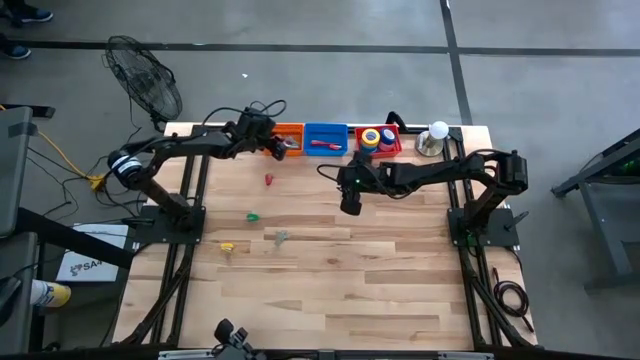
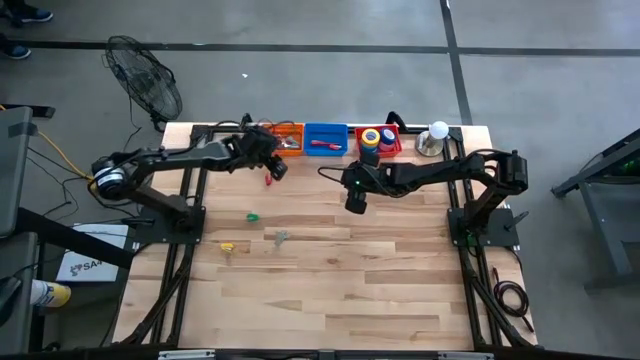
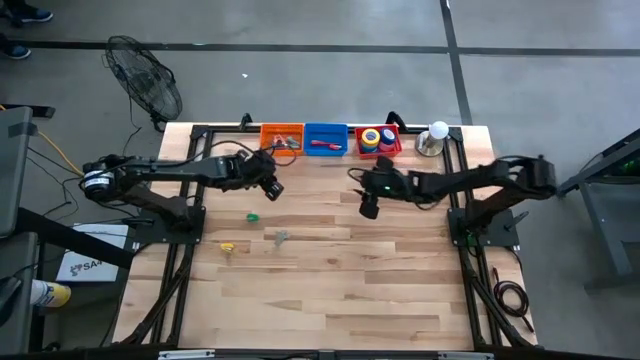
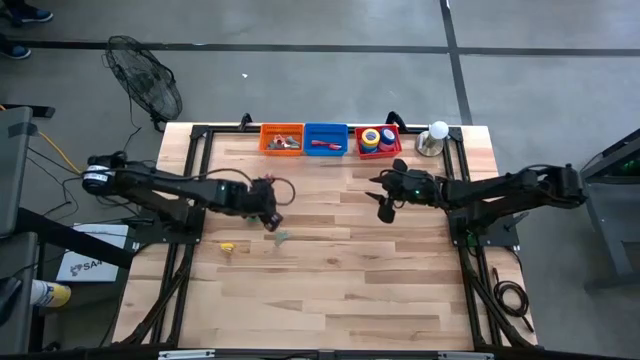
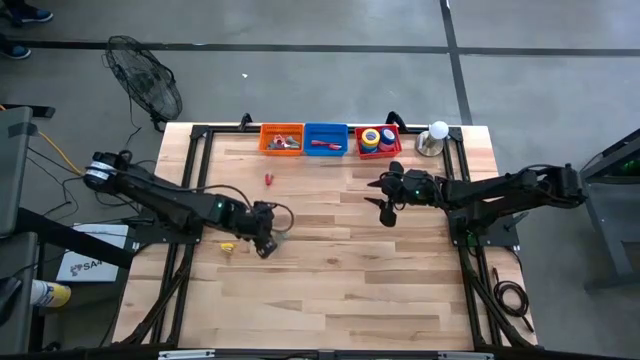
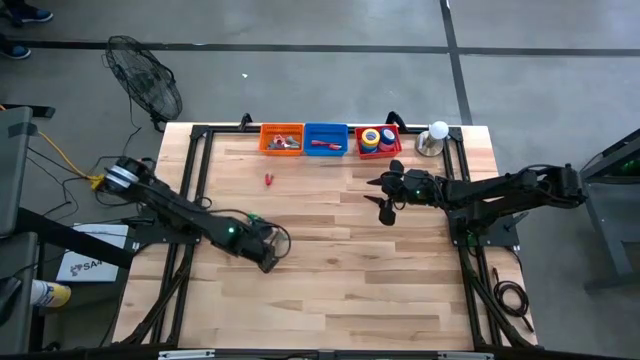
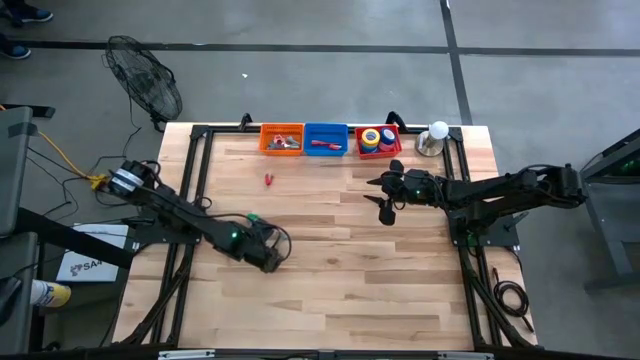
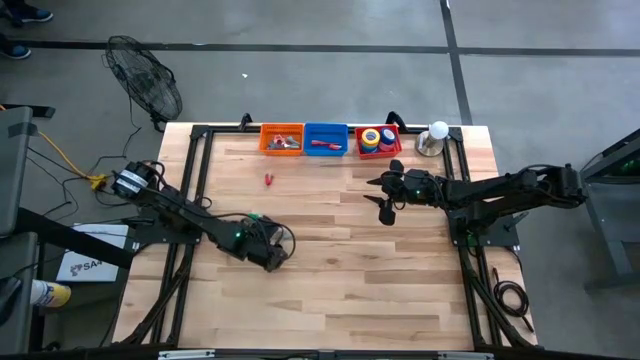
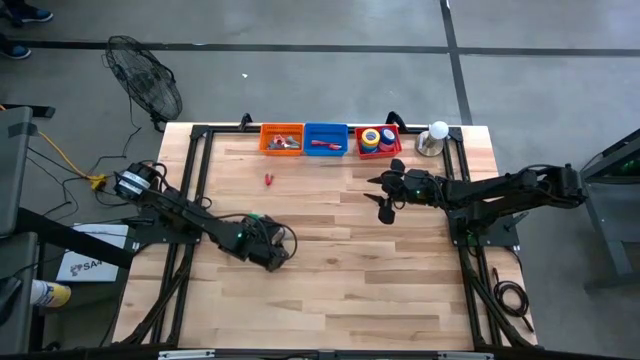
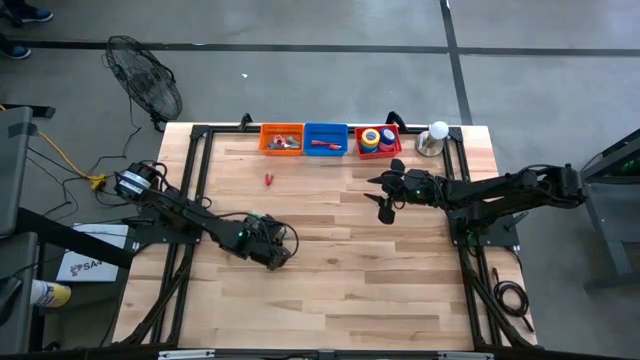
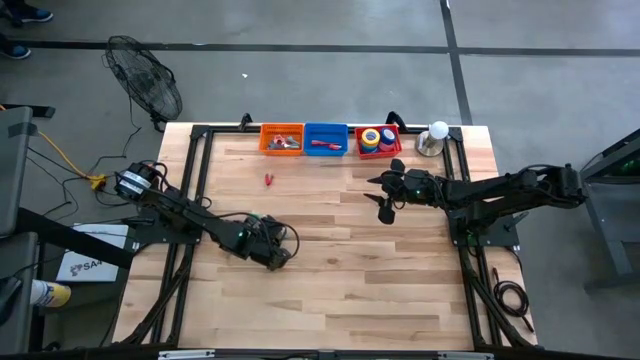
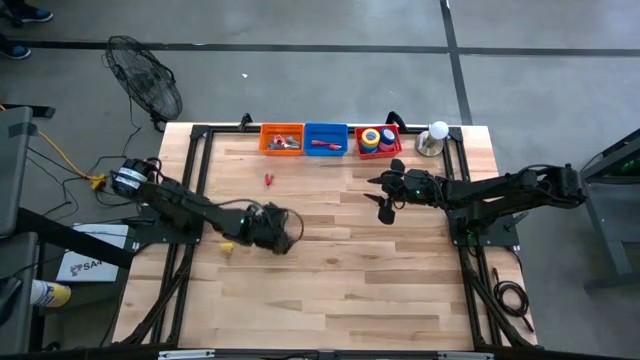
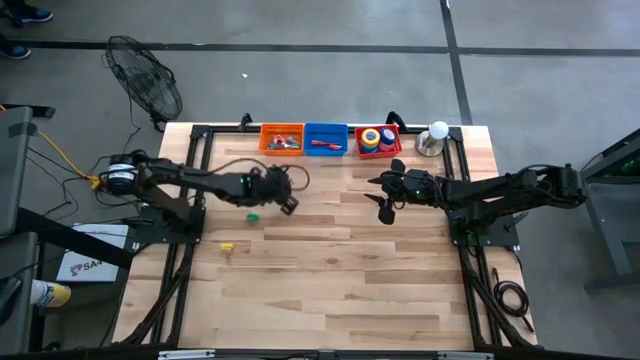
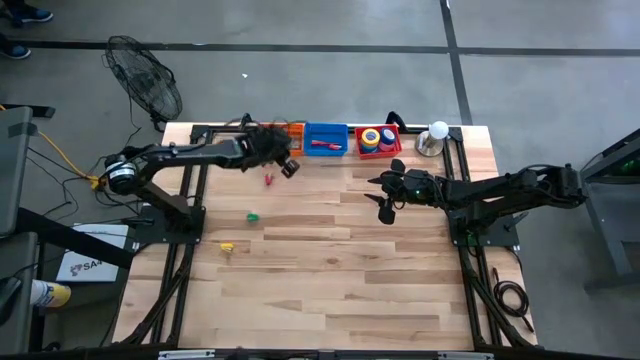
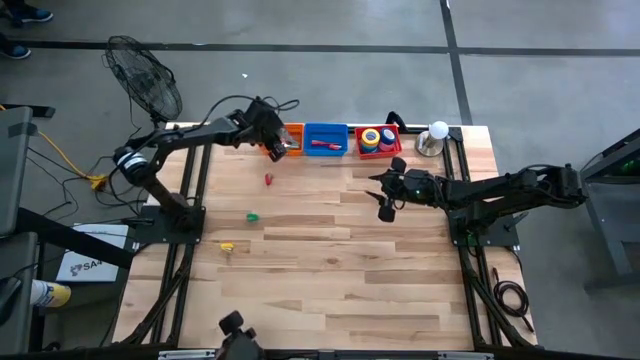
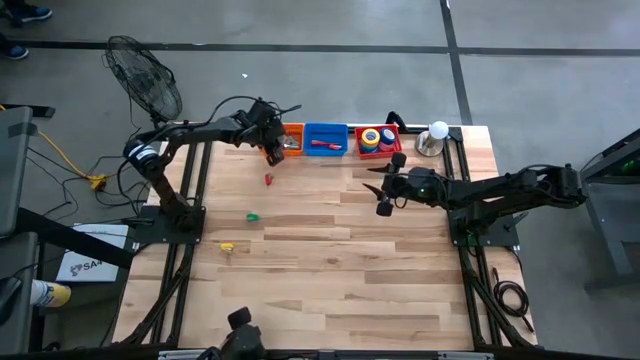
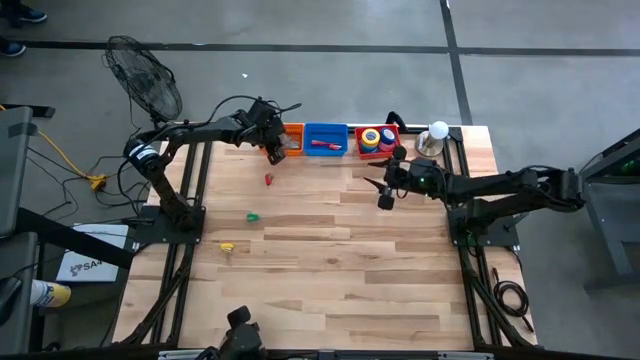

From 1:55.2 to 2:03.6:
Task: Pick and place Stapler, Stapler remover, tape
Put the light gray staple remover into the orange bin

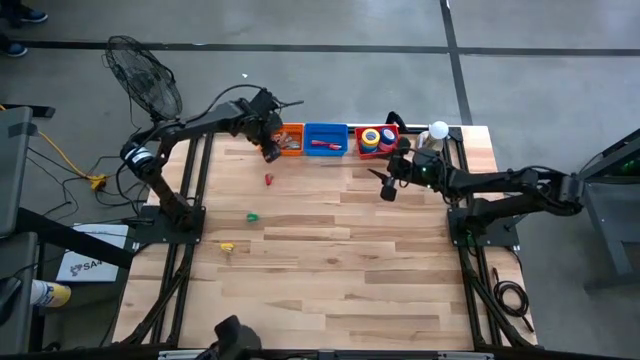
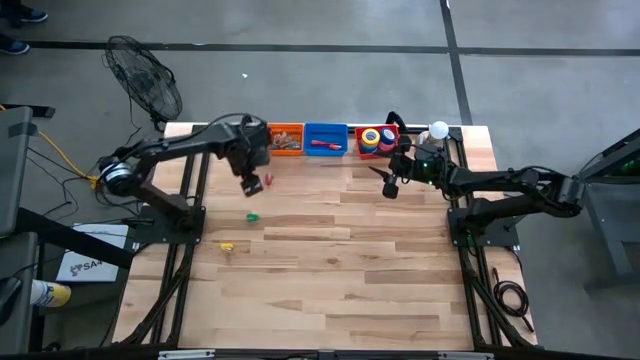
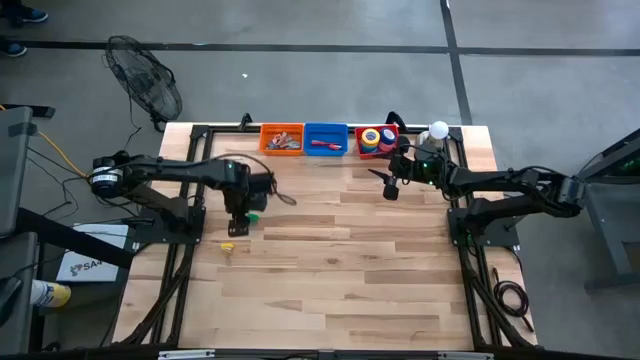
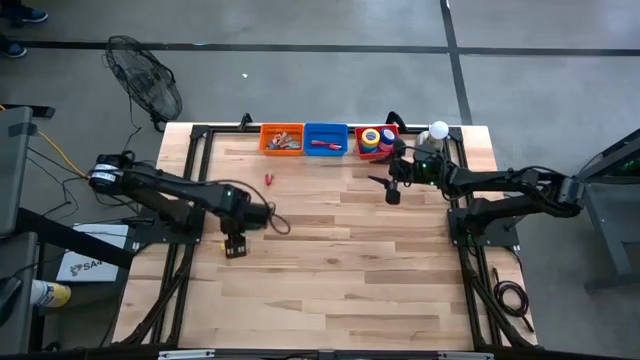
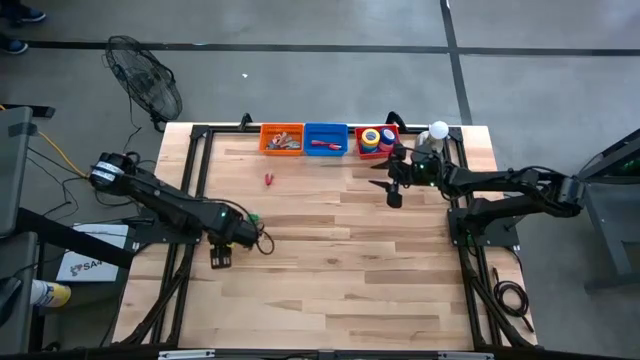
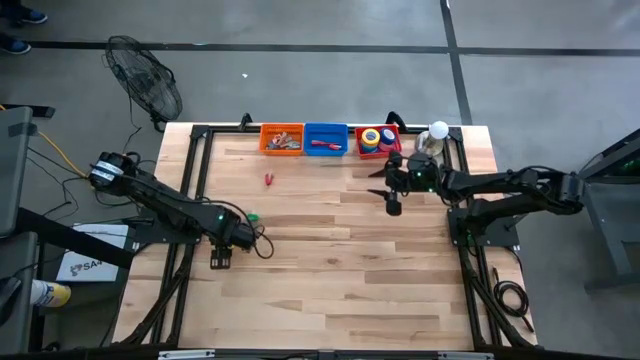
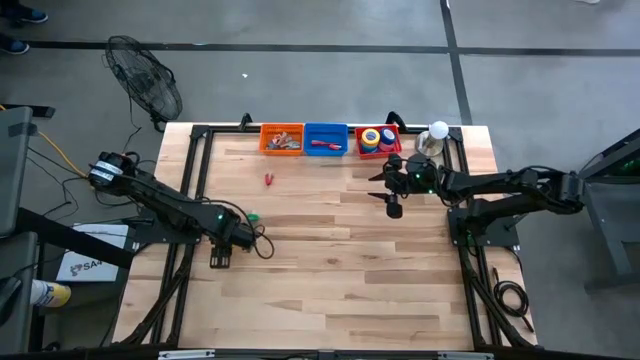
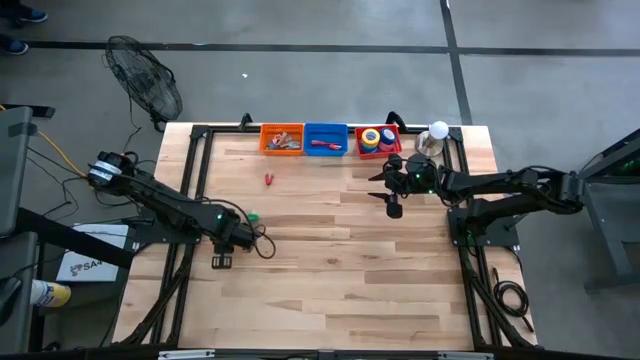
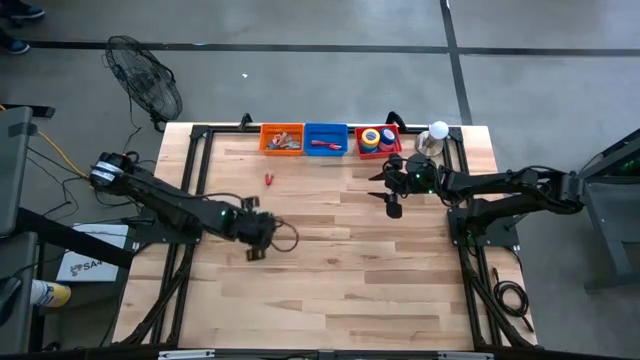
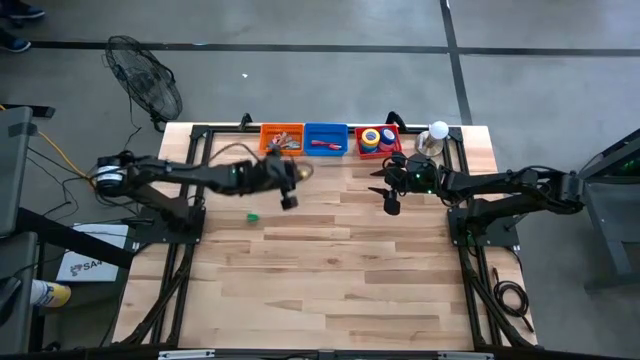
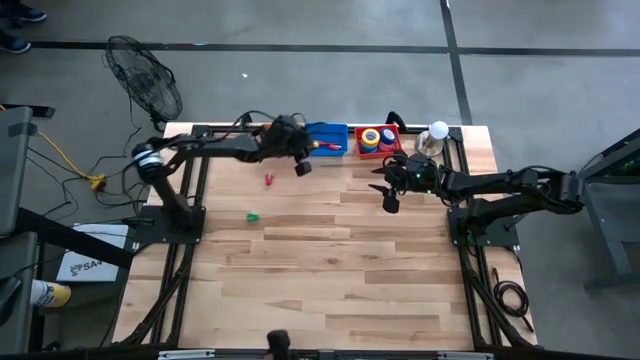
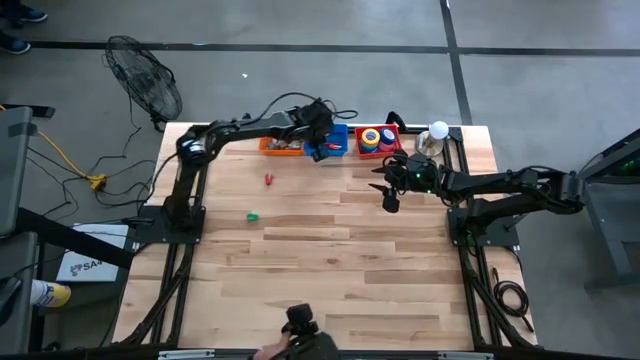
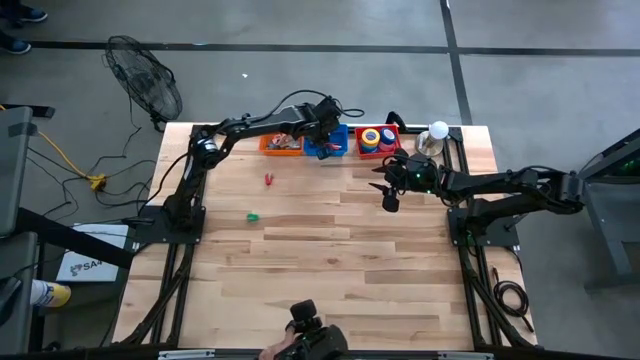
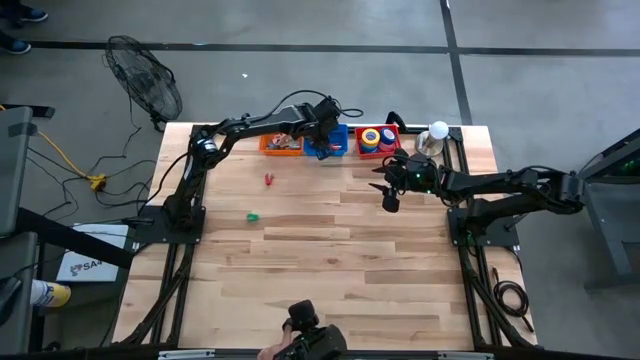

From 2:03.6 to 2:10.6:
Put the yellow stapler into the blue bin

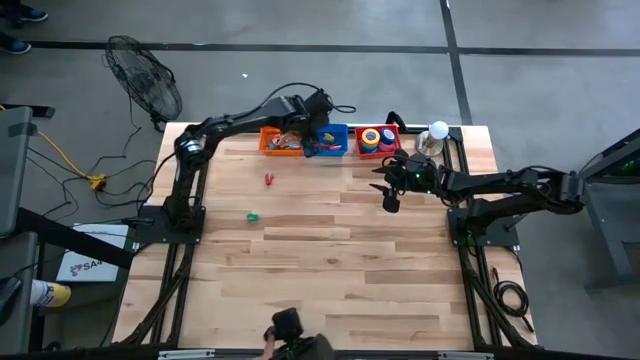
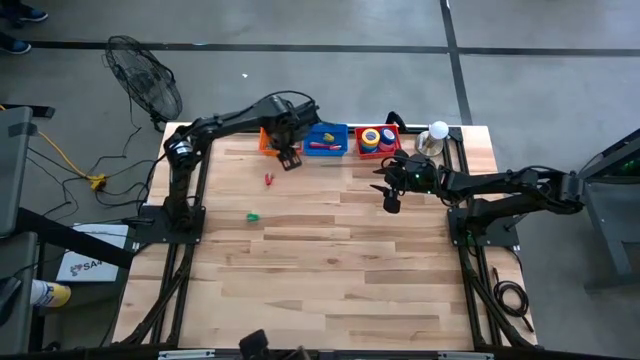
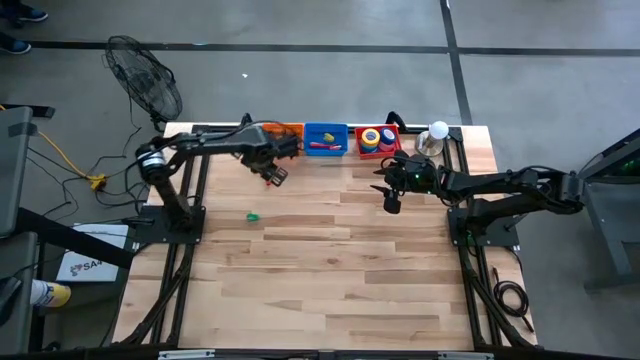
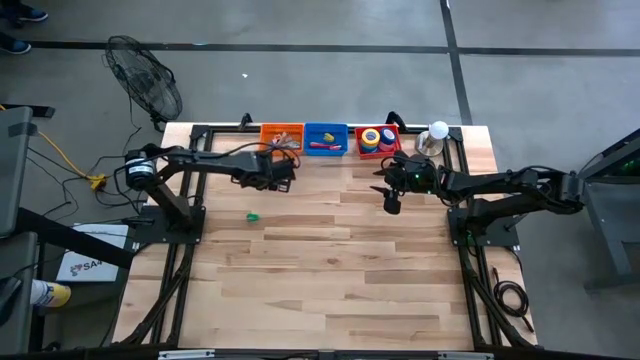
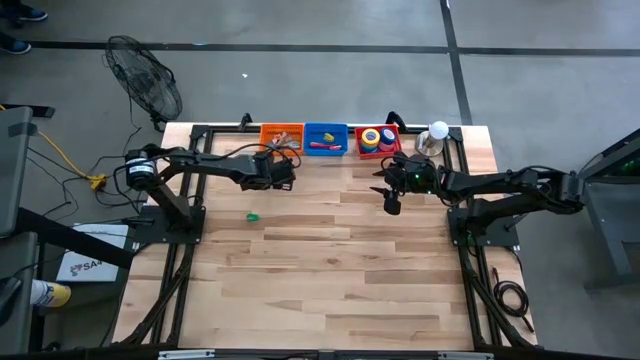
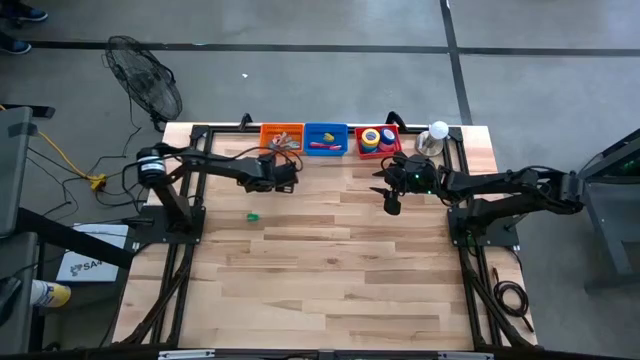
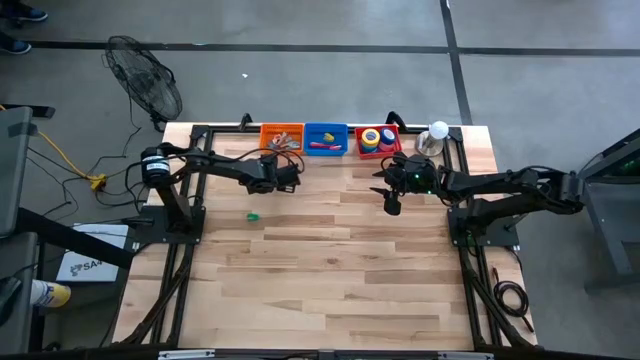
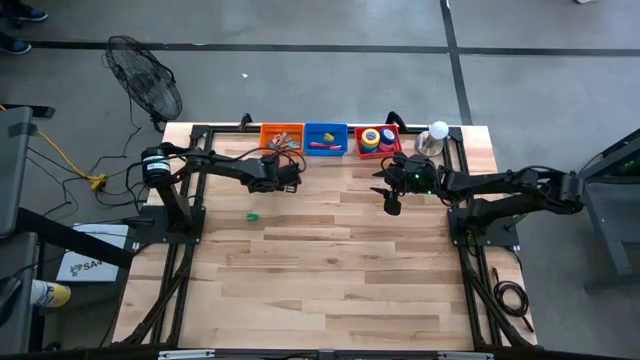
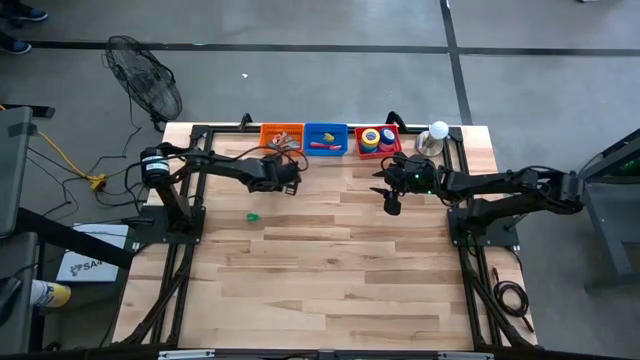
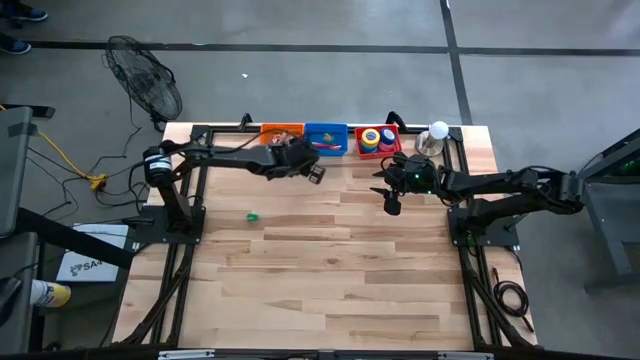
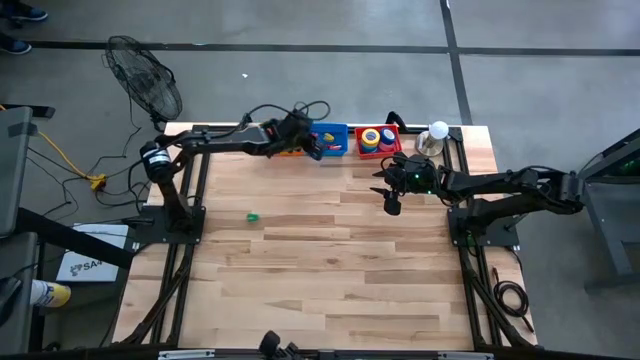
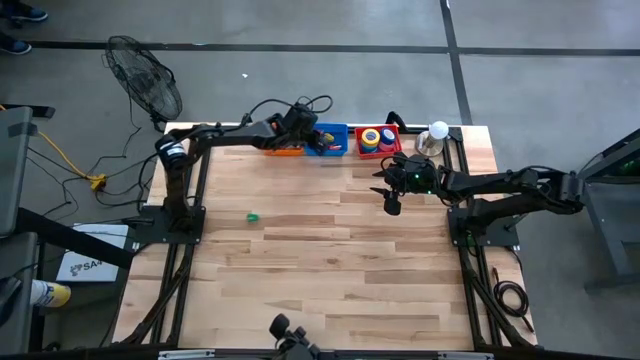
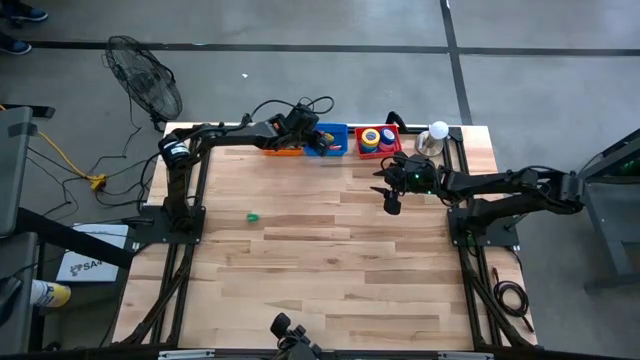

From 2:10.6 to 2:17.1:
Put the red stapler into the blue bin
